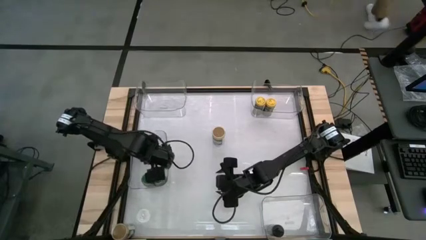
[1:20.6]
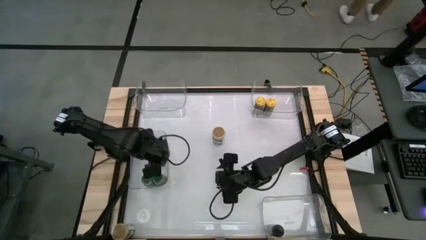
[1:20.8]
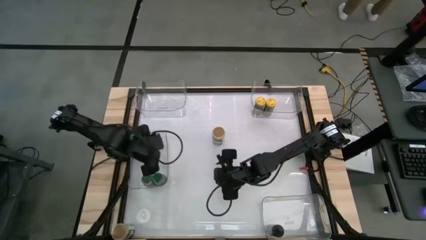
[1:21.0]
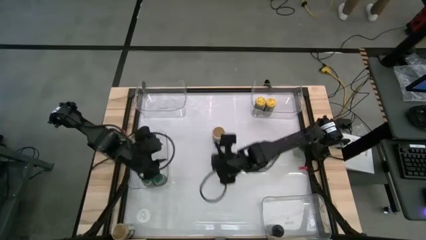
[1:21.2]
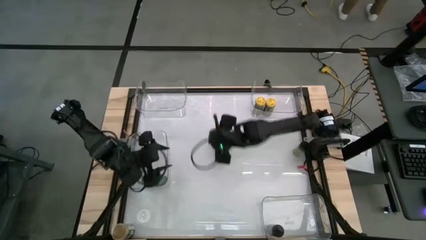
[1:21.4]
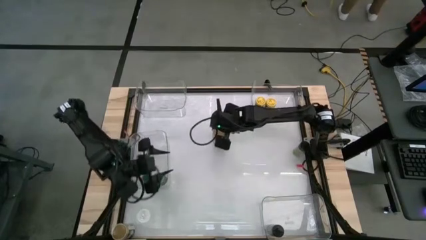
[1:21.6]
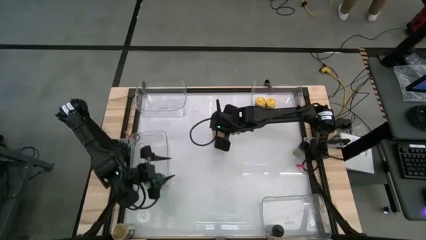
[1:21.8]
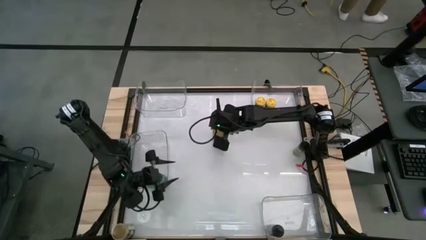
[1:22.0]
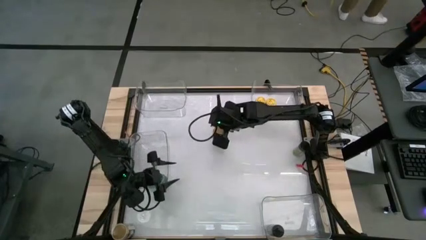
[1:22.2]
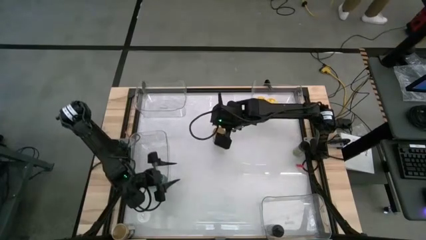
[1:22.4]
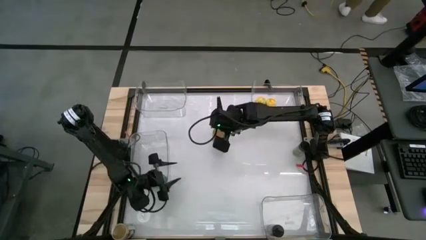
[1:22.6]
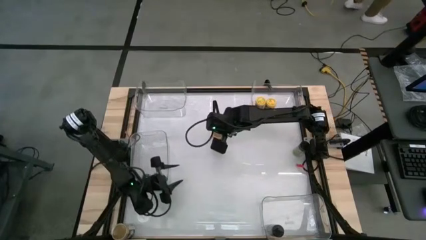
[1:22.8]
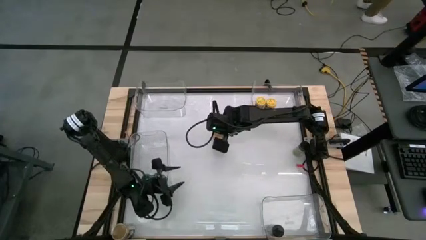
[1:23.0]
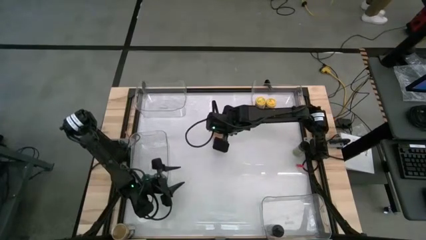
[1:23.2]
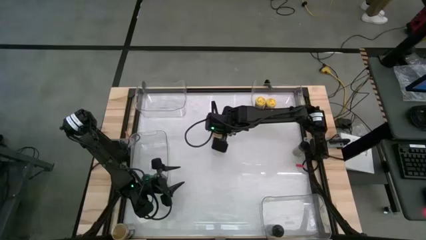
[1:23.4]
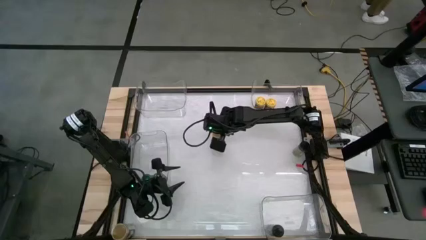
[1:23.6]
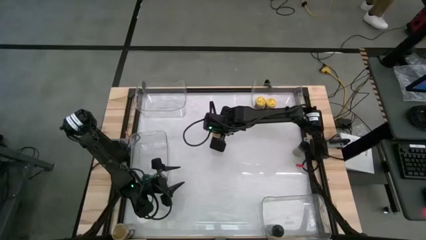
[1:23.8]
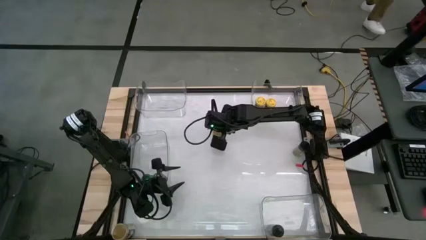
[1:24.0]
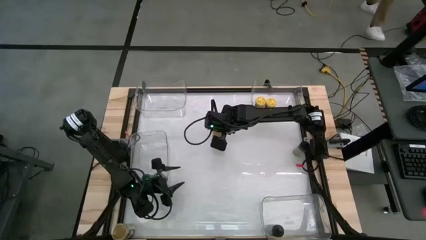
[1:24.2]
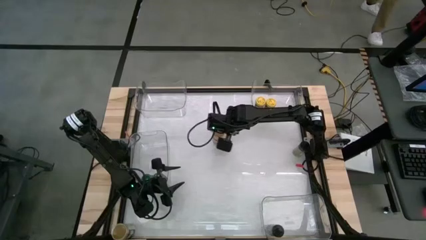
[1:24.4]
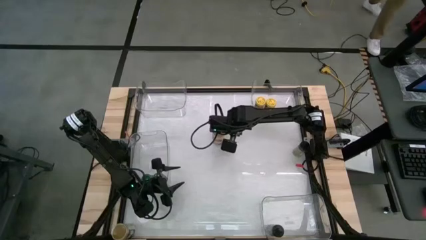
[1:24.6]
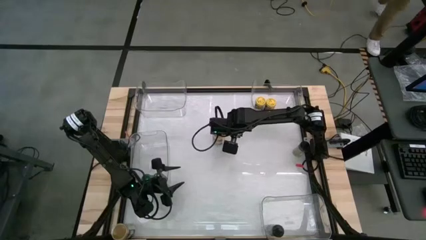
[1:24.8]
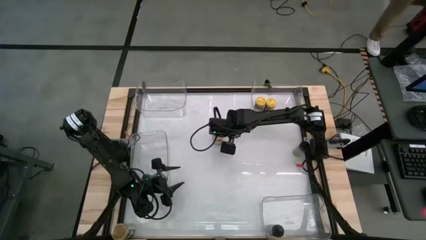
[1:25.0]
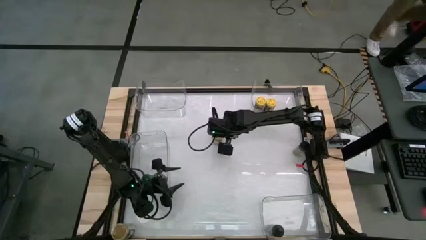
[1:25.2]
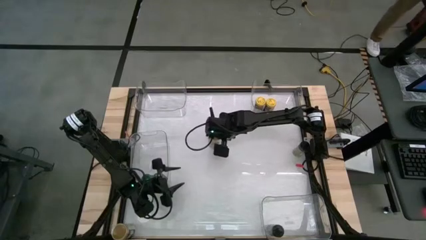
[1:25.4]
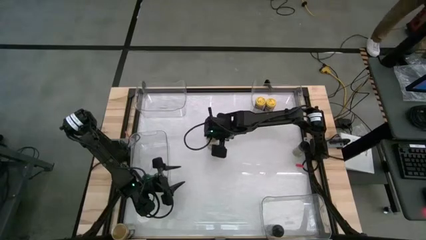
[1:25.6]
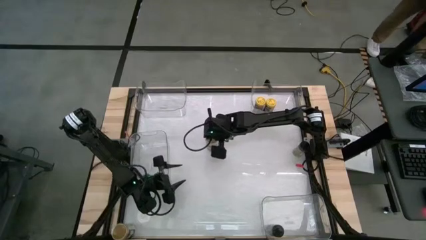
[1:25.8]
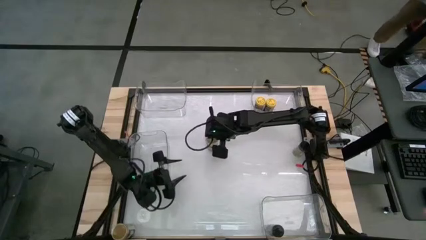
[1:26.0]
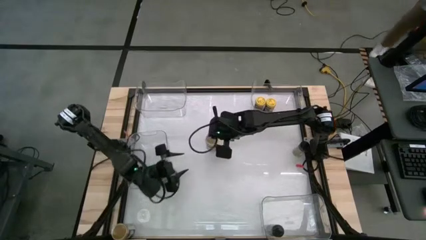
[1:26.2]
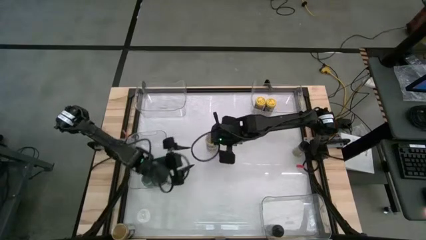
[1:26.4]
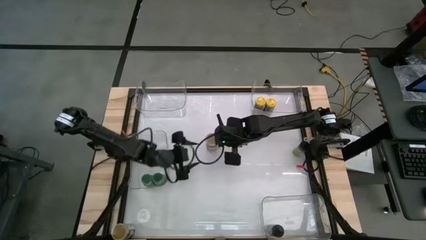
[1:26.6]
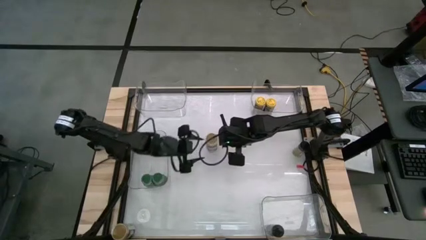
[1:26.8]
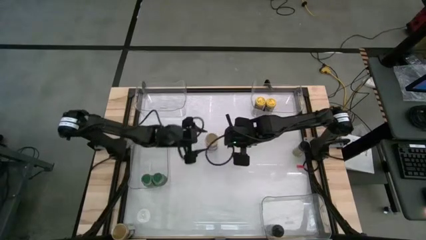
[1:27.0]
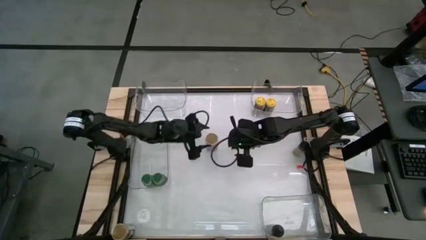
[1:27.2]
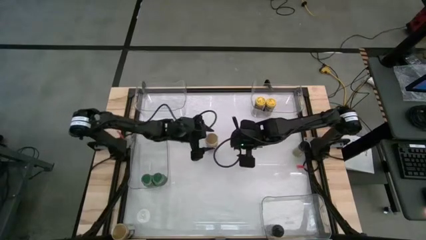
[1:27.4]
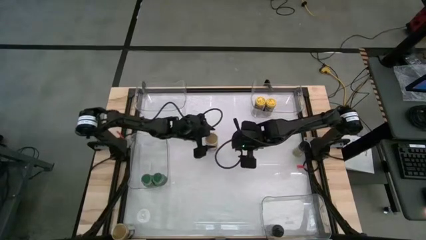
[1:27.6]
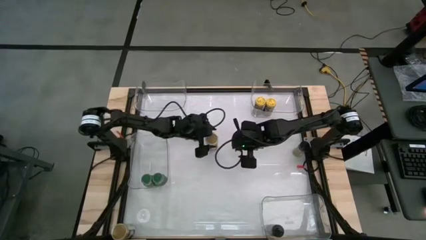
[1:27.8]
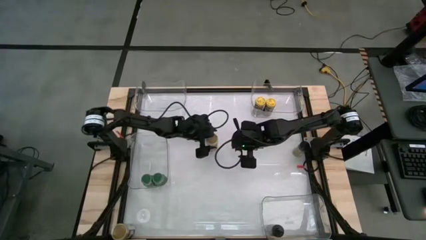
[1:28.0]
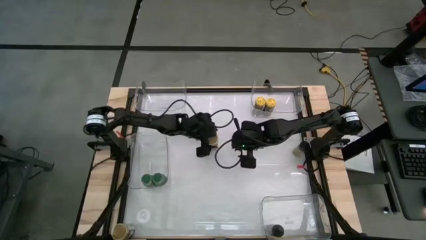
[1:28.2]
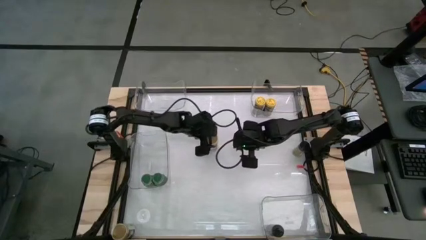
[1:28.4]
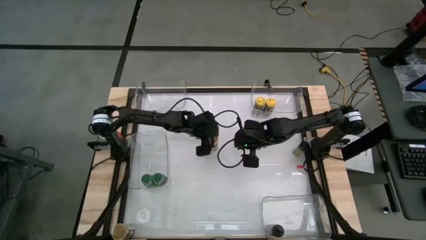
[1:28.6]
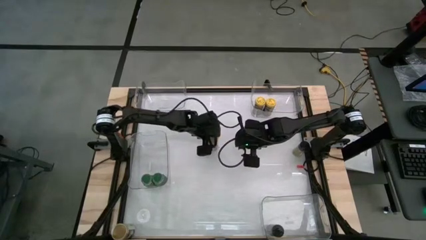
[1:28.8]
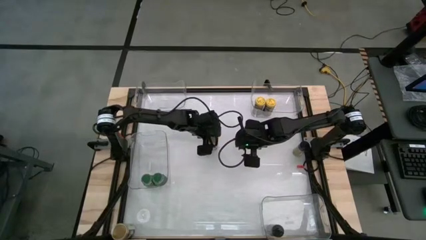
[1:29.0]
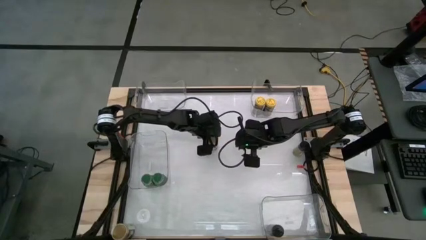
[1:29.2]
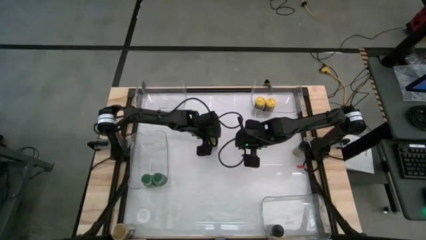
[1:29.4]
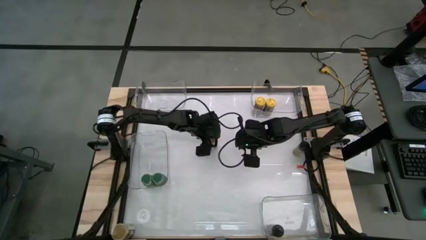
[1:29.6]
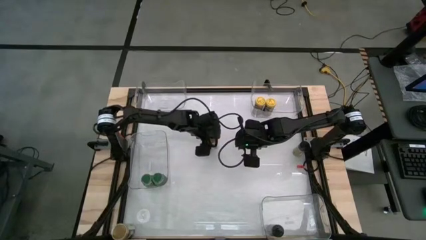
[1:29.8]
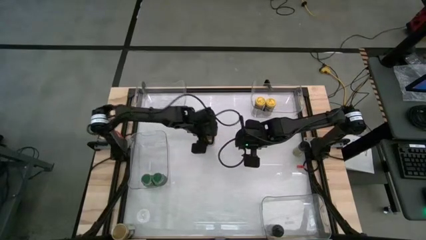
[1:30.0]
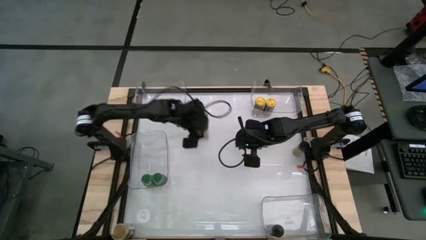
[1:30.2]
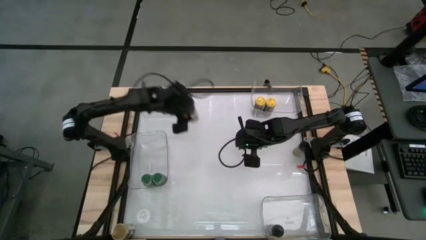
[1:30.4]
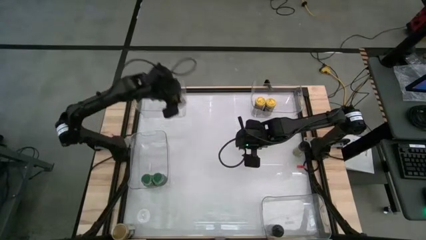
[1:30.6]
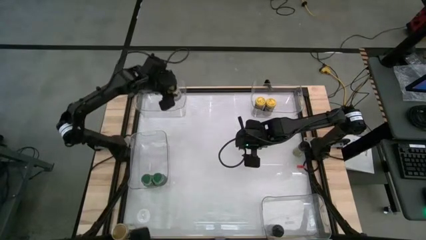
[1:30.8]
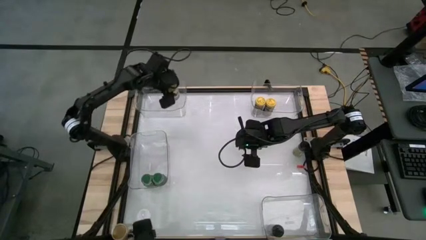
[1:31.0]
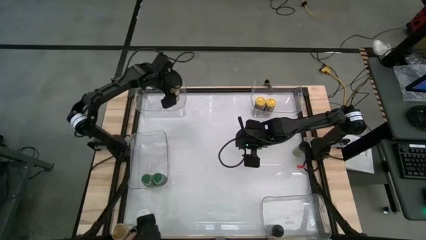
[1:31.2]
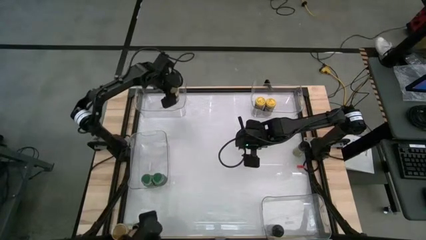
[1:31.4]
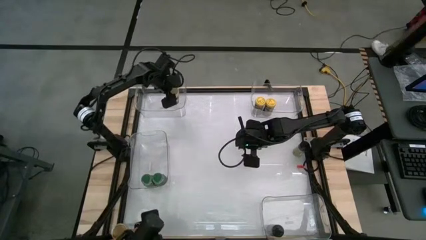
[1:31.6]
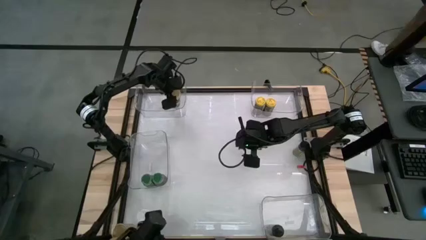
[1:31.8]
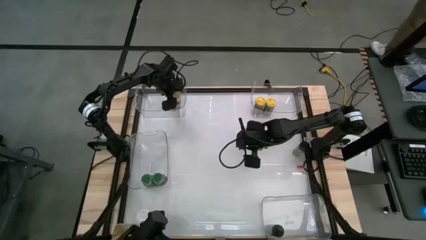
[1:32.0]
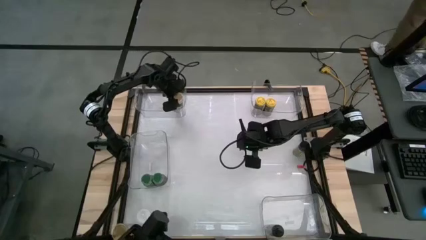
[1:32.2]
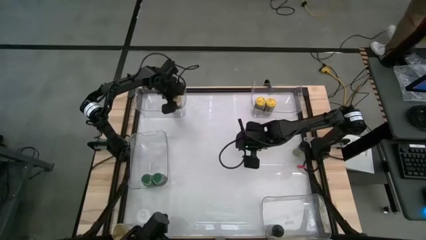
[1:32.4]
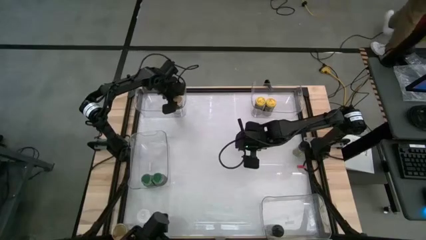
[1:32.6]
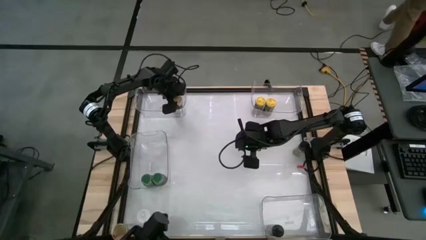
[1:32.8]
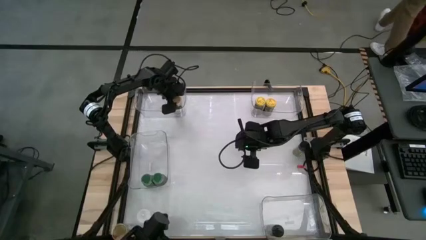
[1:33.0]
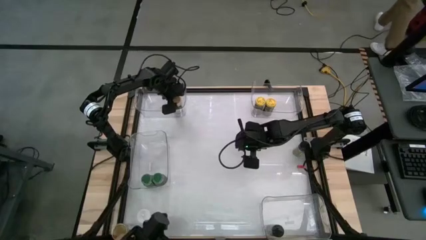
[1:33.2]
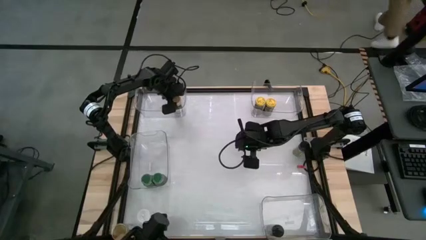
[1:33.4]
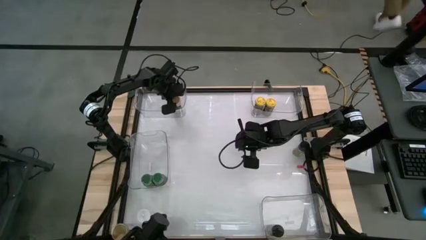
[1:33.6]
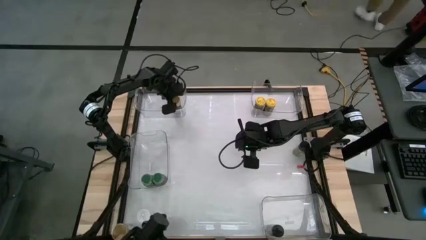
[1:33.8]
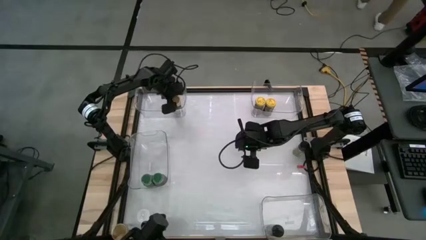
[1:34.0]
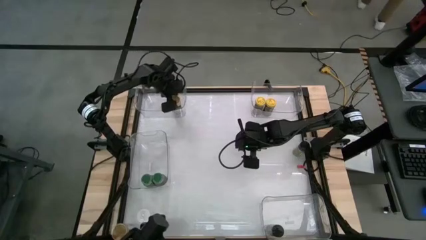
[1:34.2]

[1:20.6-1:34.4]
Task: Sort spices by type
Put the top gold seasoning bottle into the top left transparent bin

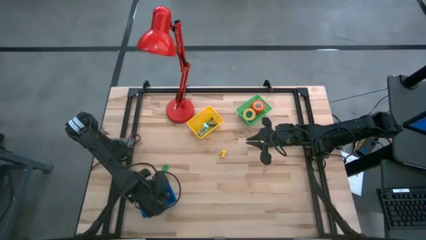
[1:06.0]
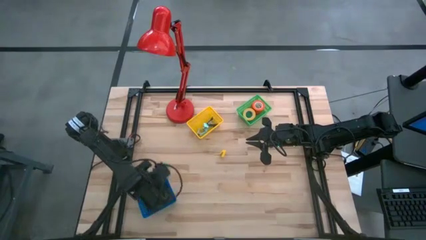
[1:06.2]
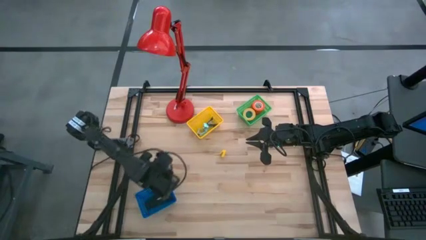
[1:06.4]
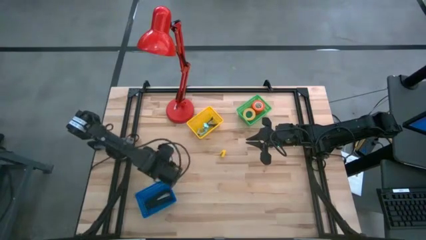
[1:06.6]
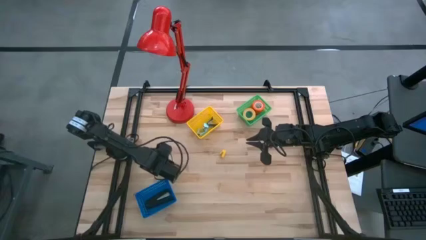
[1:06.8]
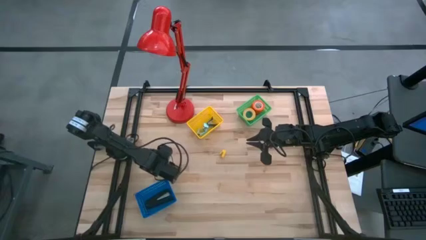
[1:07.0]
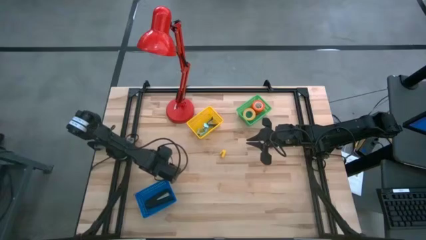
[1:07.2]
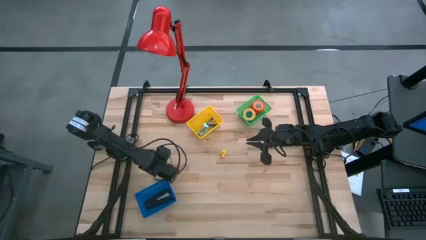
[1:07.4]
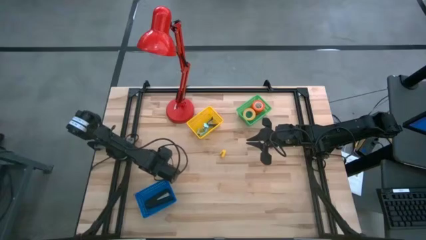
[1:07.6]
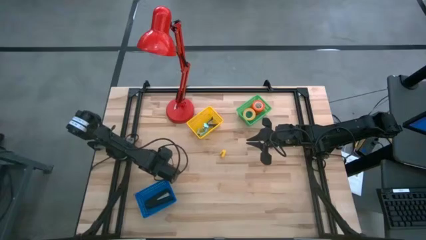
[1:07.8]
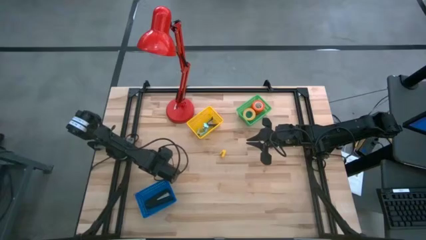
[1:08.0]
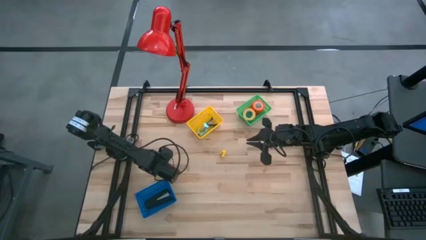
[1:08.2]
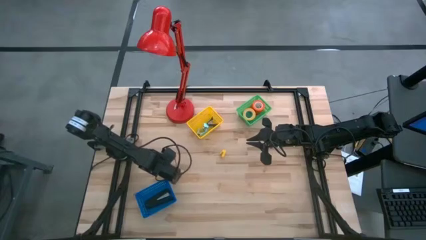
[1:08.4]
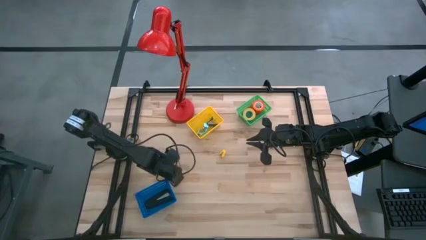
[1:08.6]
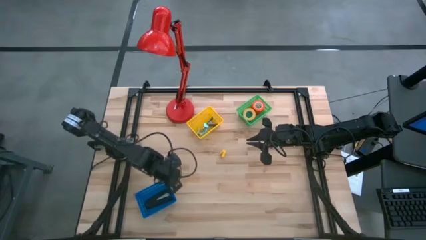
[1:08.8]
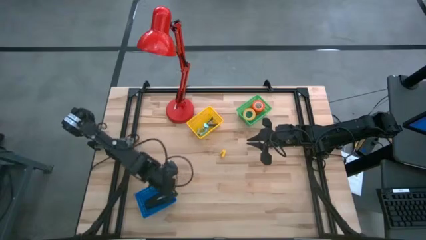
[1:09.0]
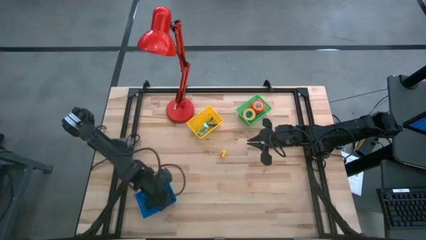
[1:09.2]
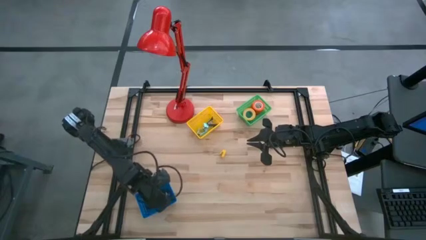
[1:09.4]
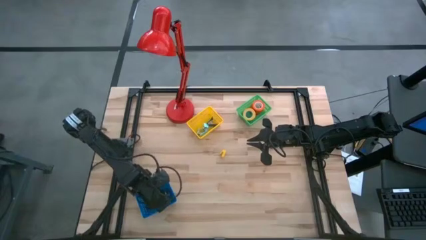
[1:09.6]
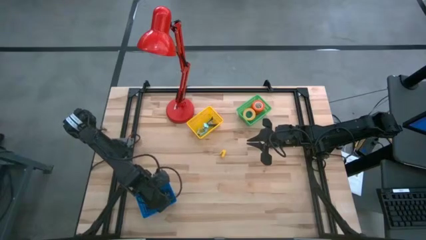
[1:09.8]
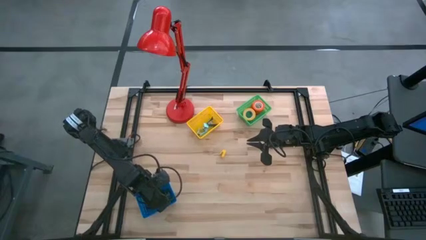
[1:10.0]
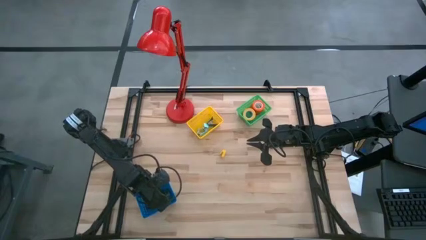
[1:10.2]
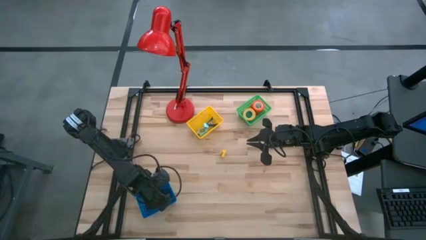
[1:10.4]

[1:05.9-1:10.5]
Task: Pick and place Stapler, Stapler remover, tape
Put the small green stapler into the blue bin
